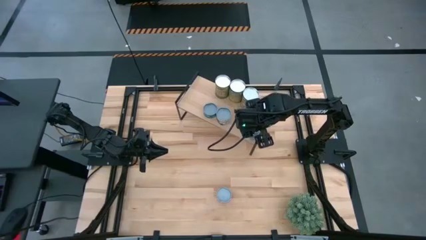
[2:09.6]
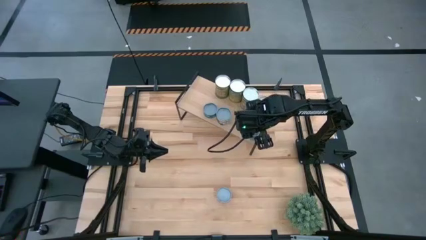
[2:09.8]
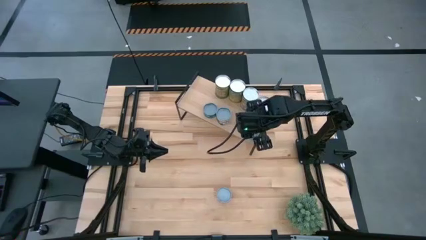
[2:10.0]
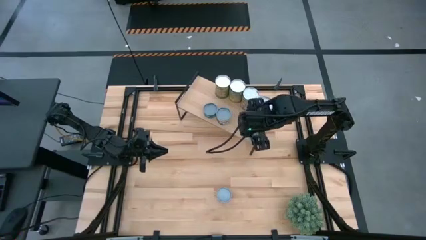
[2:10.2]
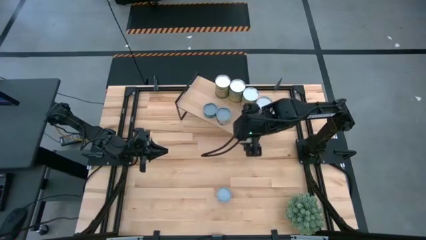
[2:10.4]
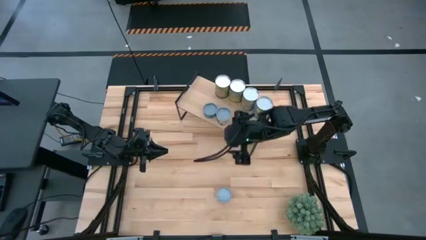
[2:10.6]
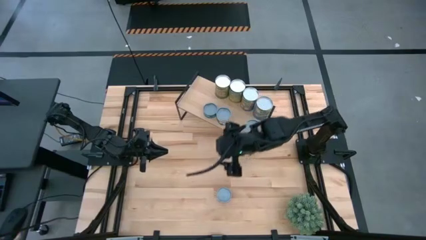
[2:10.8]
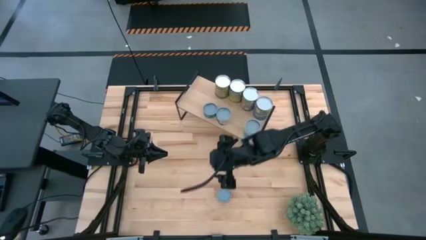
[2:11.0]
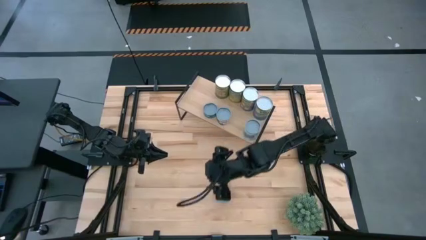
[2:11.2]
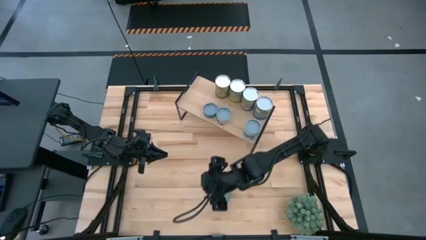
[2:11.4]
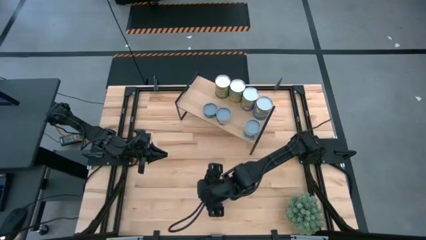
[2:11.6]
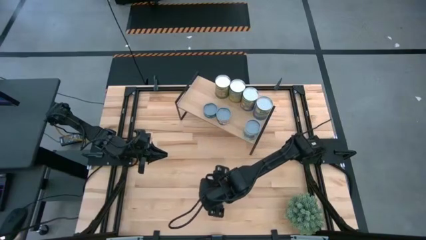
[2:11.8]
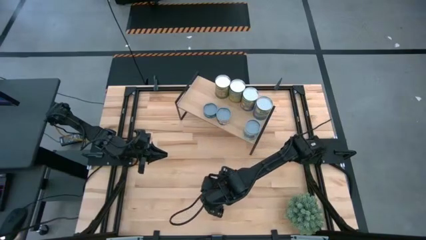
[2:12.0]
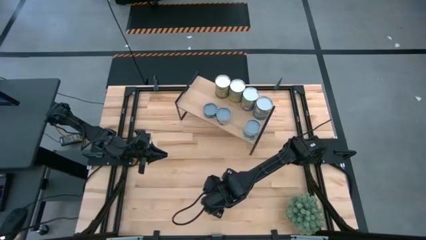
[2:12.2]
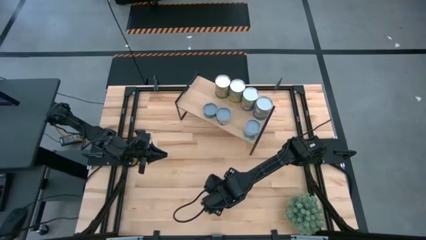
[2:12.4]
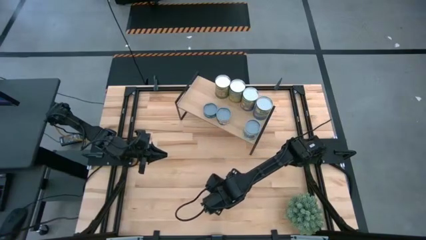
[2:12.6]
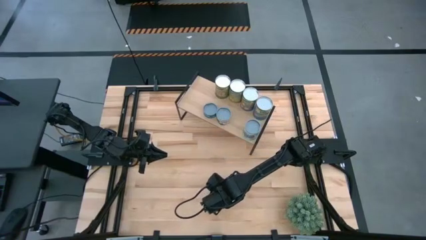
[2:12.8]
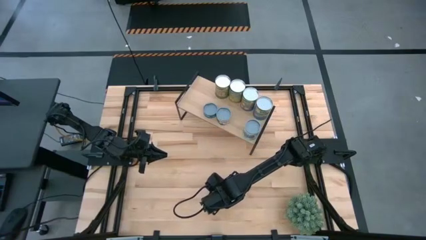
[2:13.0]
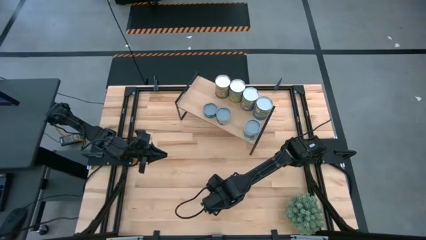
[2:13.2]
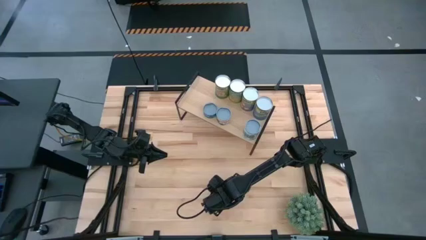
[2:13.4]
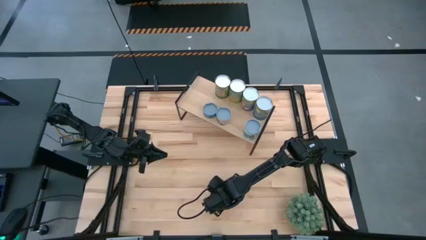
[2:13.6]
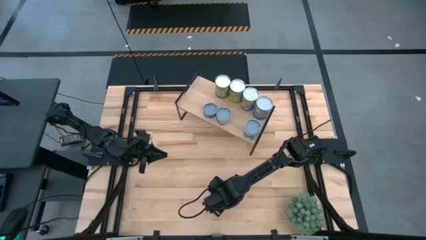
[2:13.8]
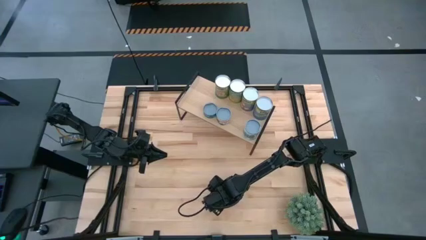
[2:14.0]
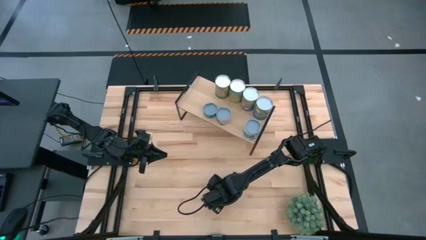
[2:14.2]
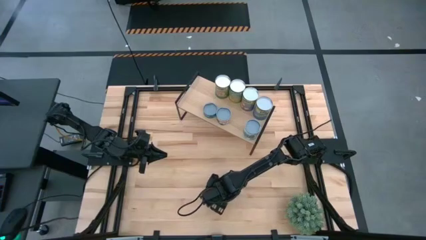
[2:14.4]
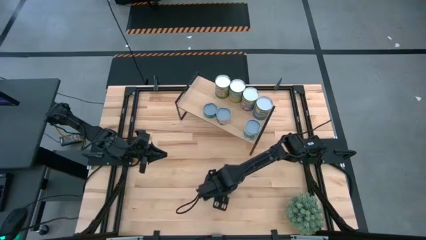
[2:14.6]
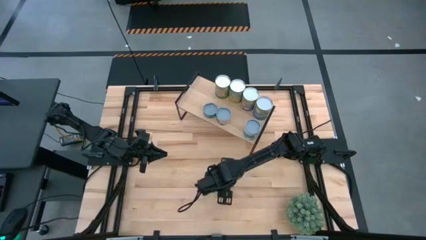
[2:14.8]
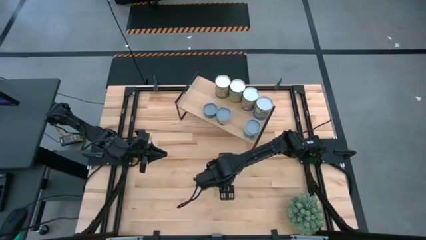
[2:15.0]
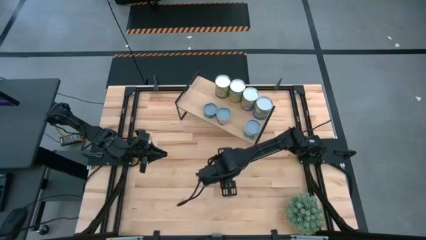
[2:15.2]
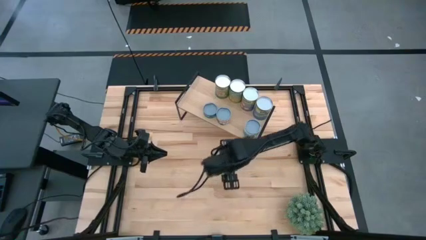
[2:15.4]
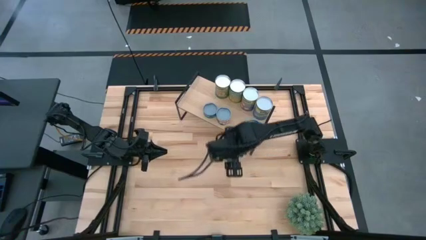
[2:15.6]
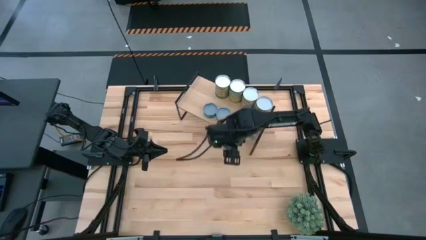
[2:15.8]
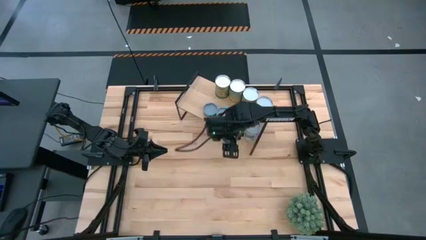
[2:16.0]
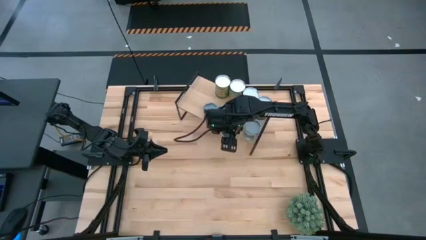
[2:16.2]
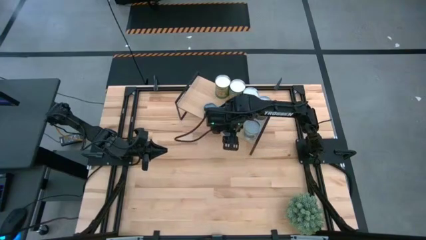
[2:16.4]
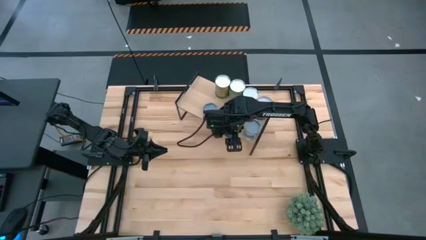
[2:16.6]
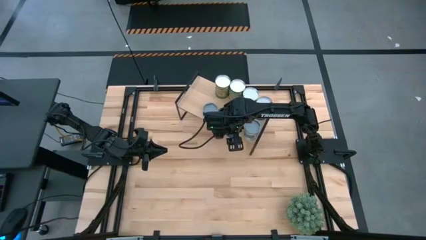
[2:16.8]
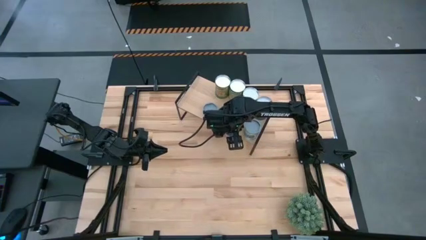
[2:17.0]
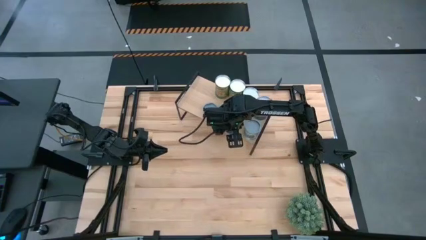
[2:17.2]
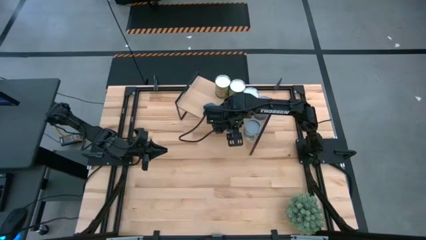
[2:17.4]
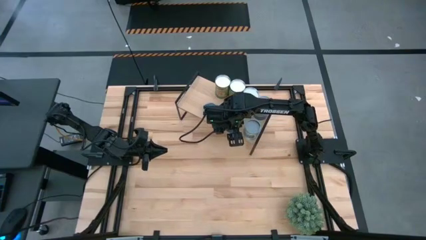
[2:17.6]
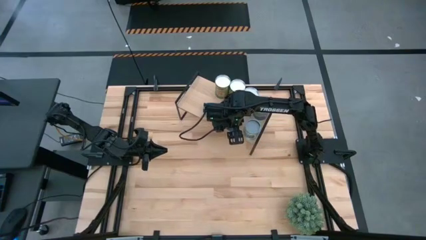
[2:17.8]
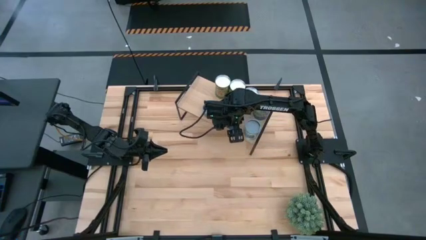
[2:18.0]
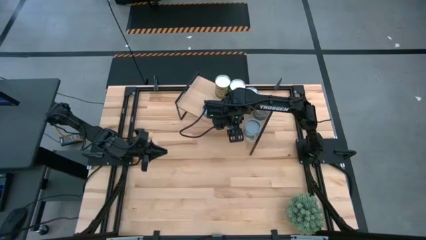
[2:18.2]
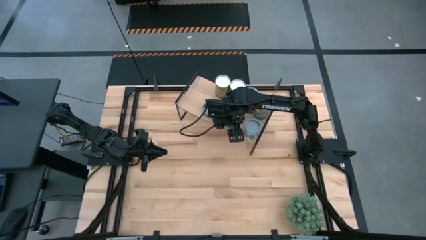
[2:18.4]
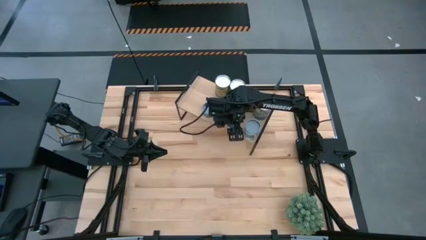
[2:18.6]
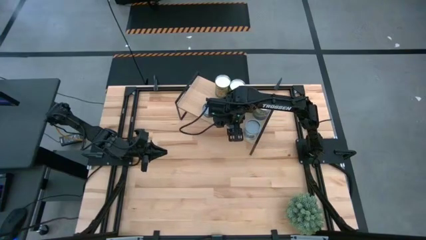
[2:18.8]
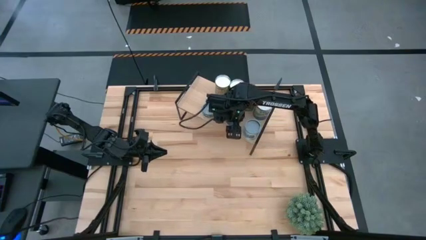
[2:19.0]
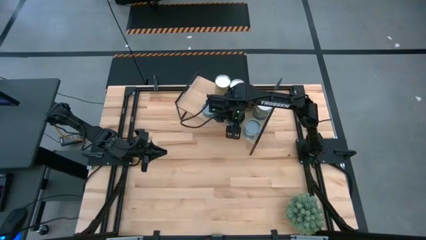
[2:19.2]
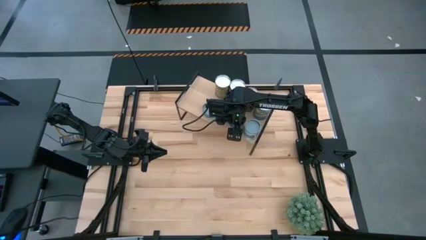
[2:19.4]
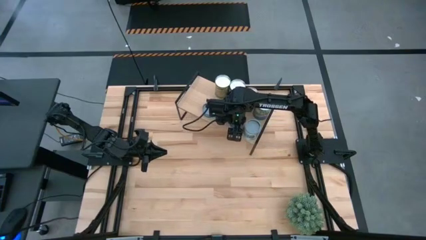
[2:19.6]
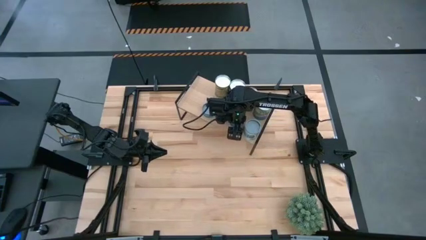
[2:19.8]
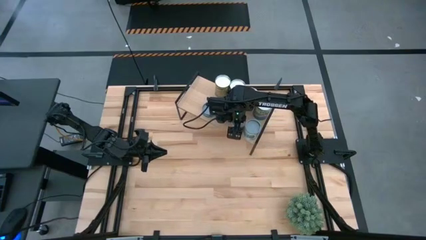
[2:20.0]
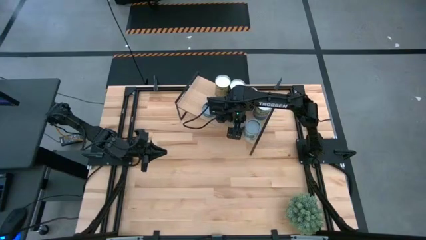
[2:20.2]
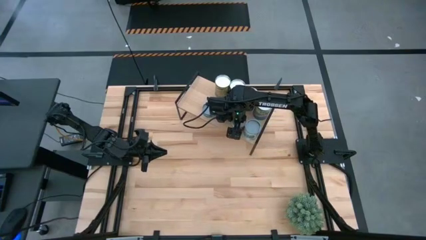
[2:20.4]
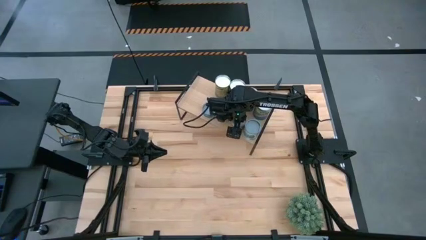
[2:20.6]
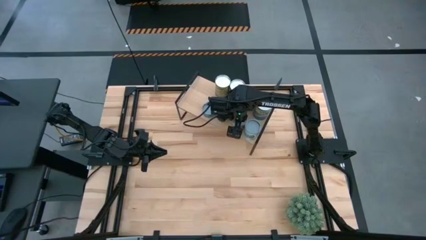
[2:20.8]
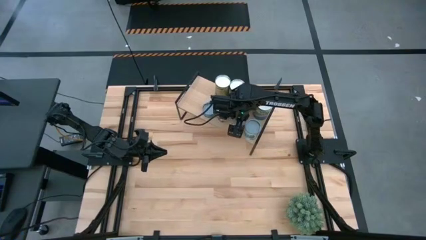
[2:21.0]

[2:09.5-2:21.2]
Task: Pick and place cans onto a shelf
Put the canned tomatoes on the shelf

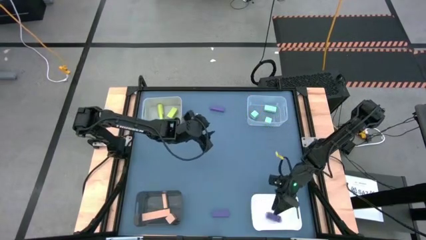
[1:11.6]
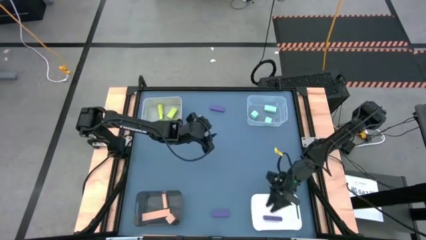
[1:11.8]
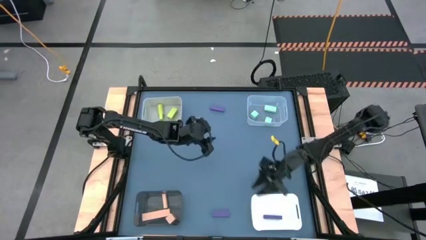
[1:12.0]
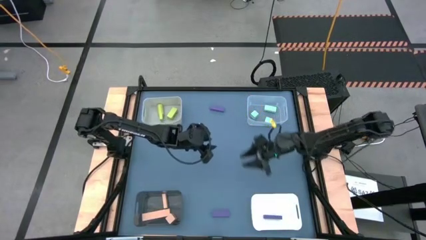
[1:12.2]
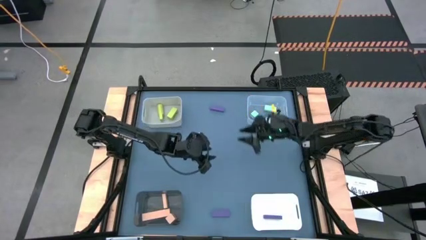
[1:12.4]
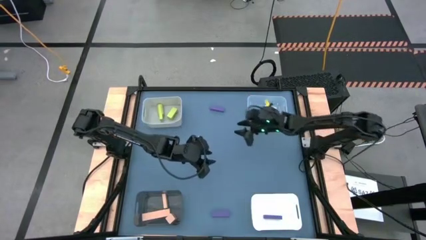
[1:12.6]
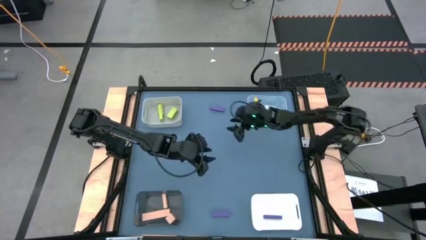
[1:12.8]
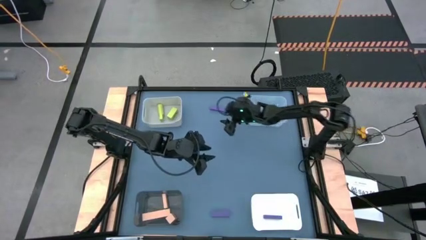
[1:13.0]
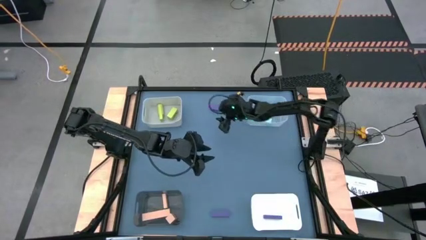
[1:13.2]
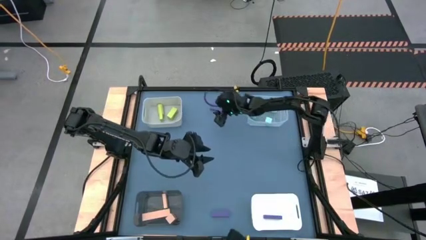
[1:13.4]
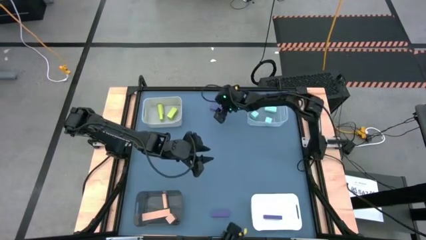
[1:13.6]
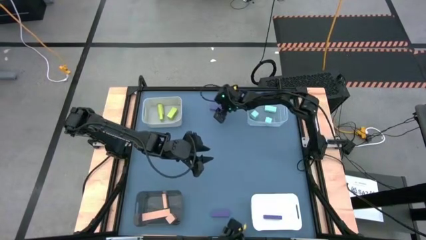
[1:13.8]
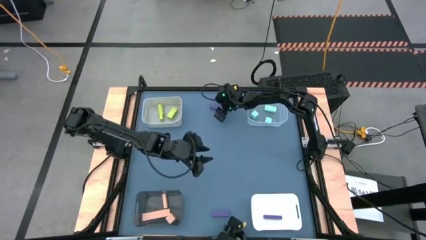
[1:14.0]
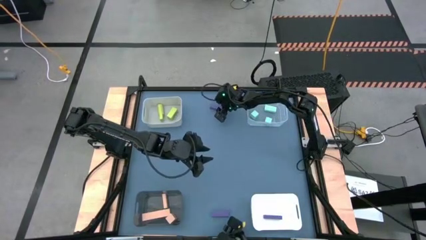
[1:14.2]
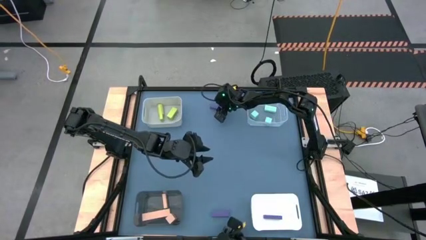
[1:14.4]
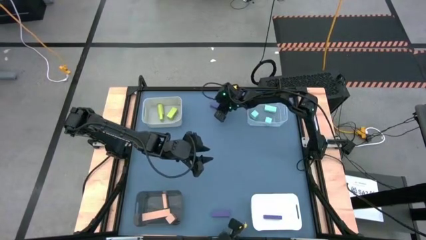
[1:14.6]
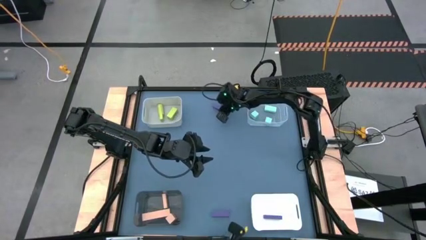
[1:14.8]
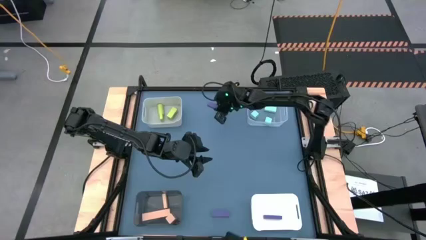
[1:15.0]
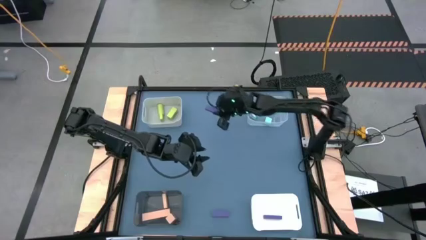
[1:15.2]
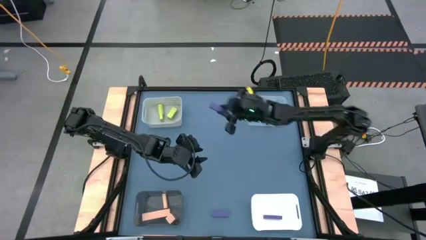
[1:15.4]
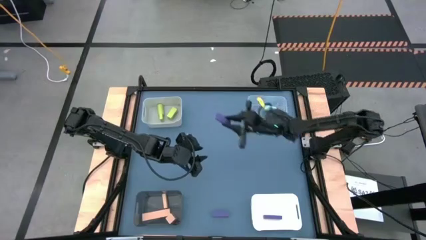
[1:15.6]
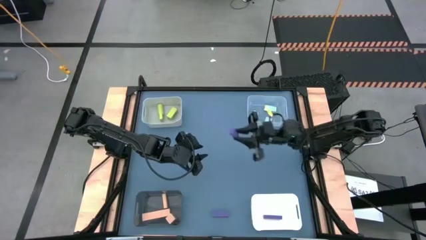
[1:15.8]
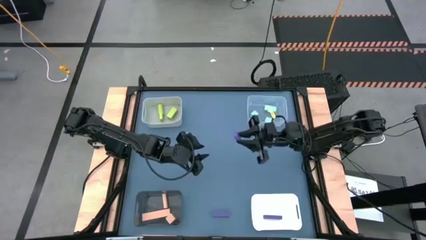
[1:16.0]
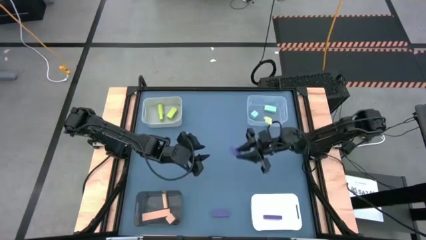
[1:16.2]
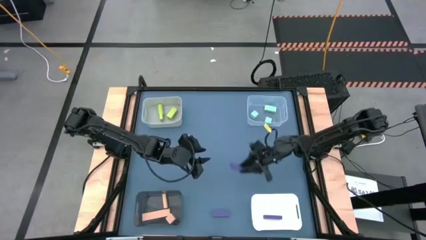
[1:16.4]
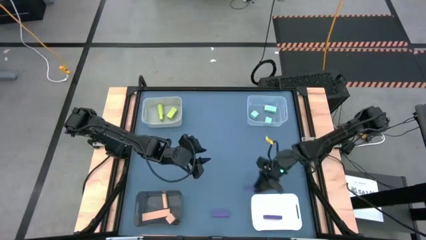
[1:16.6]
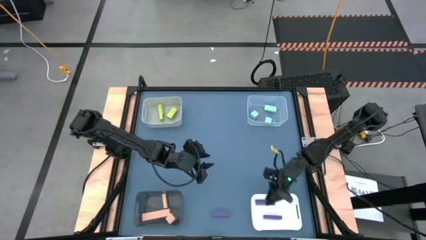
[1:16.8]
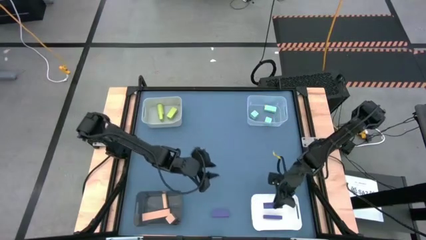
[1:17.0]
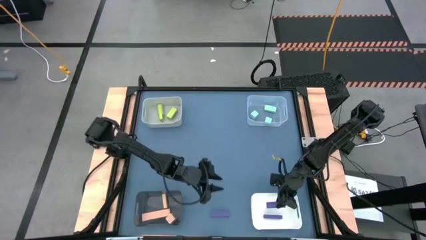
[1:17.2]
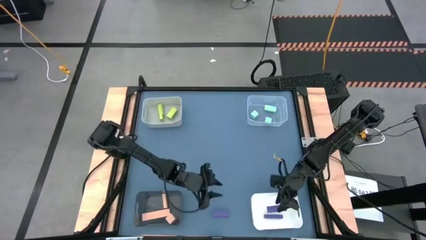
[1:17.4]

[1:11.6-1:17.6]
Task: Sort & place blocks by color
Put the purple block into the white bin
